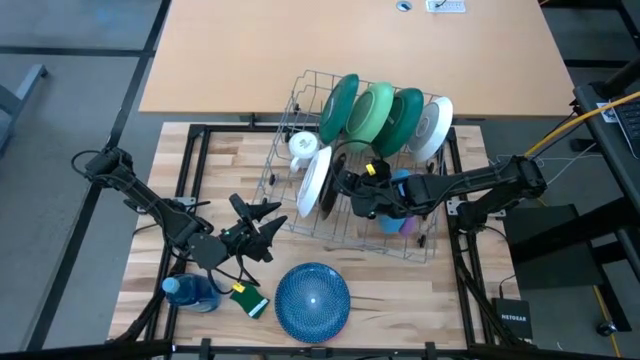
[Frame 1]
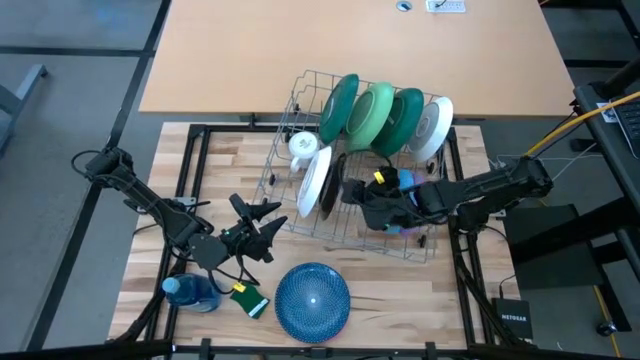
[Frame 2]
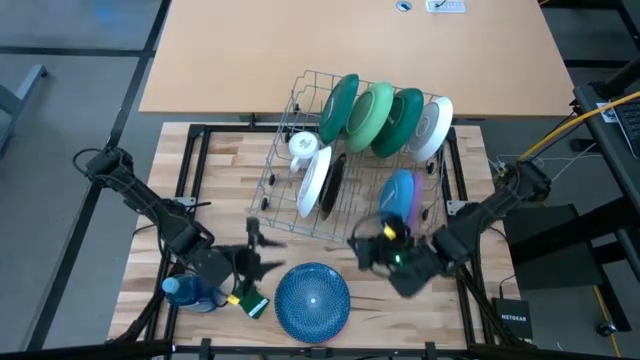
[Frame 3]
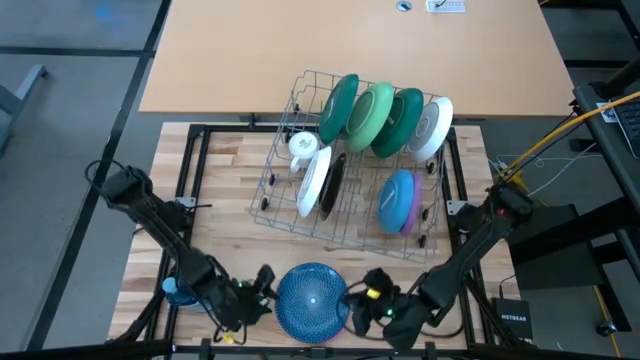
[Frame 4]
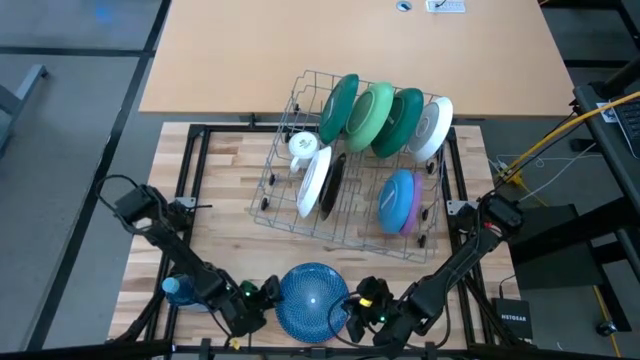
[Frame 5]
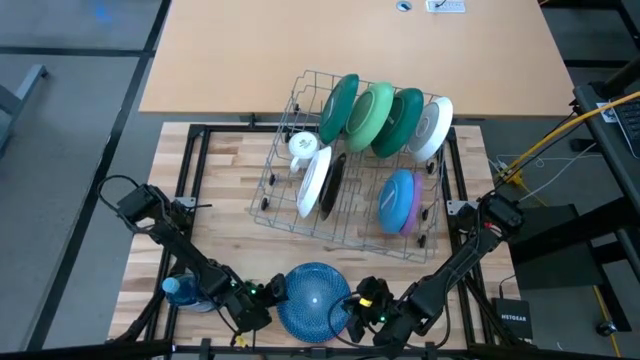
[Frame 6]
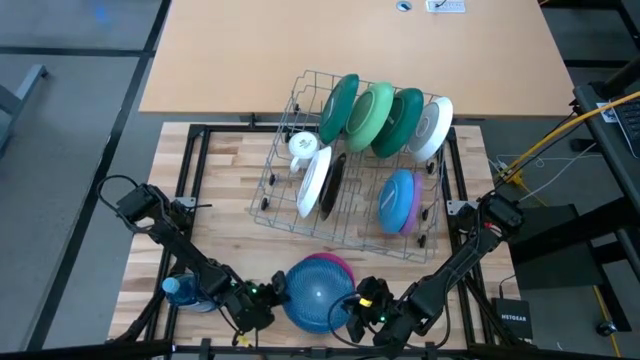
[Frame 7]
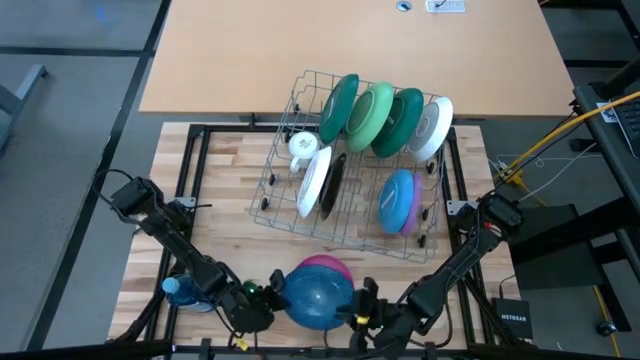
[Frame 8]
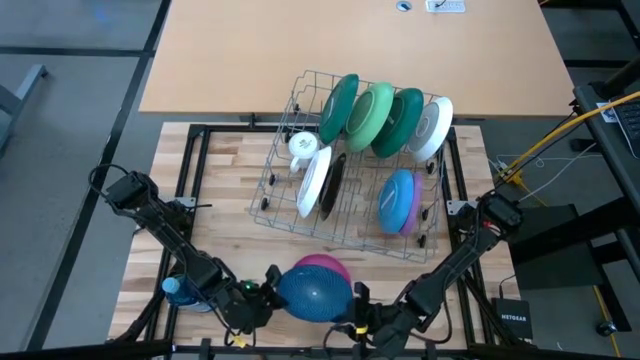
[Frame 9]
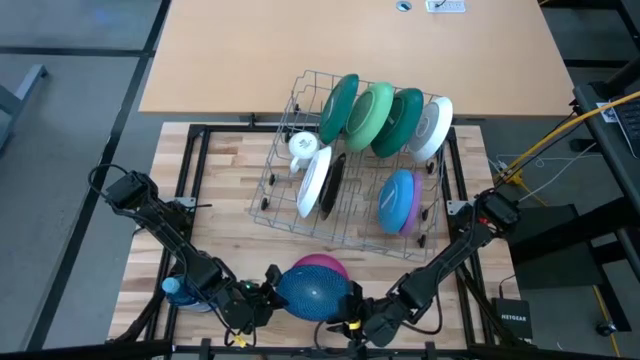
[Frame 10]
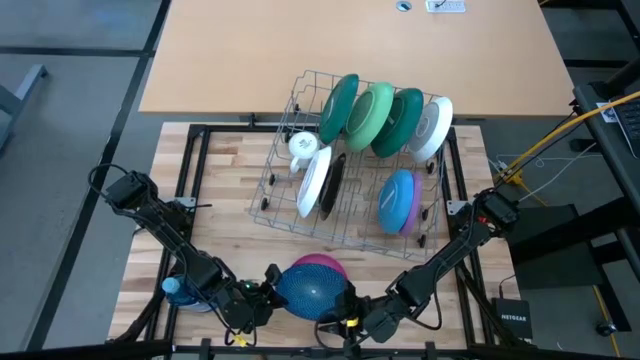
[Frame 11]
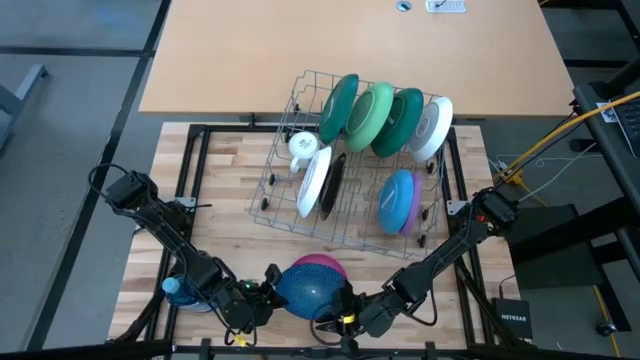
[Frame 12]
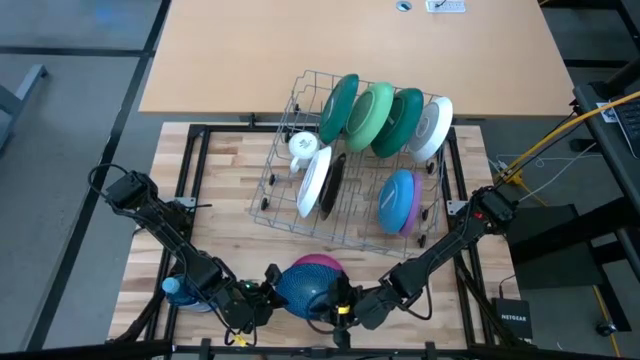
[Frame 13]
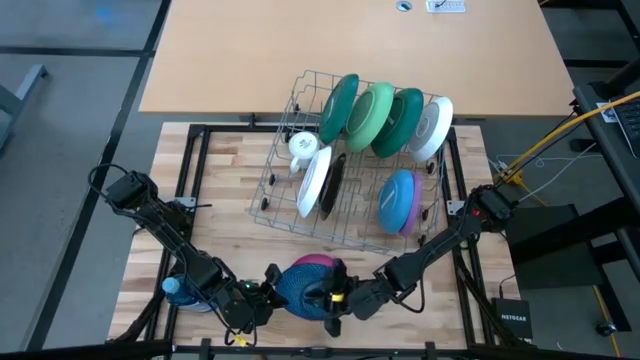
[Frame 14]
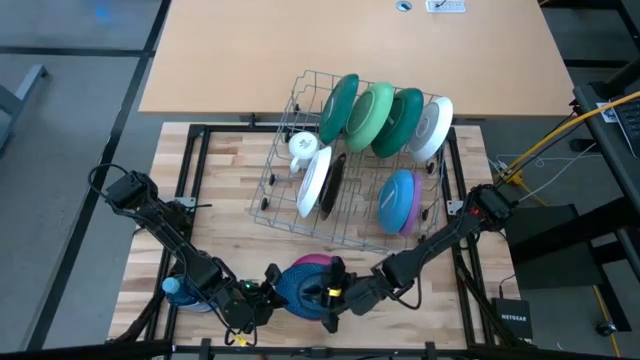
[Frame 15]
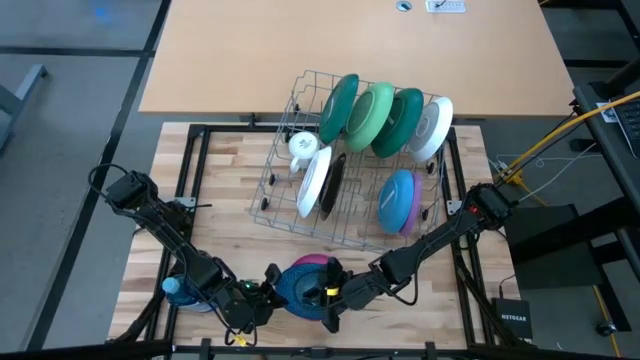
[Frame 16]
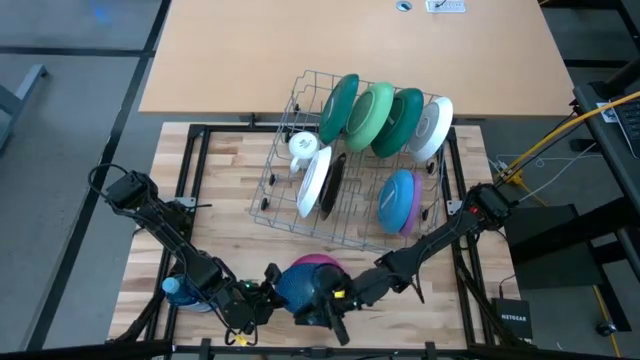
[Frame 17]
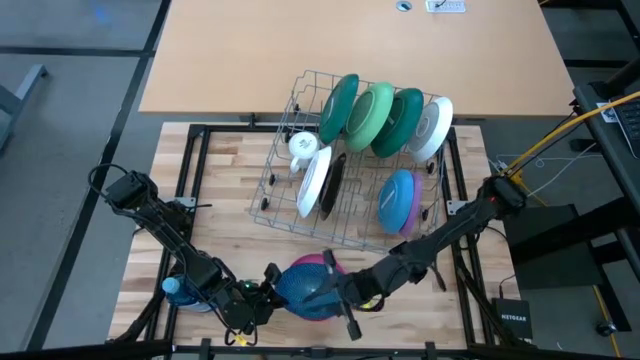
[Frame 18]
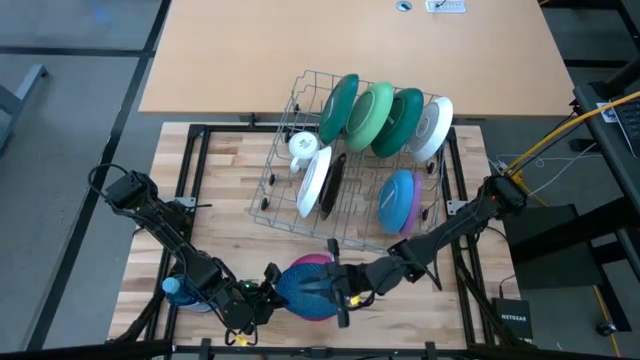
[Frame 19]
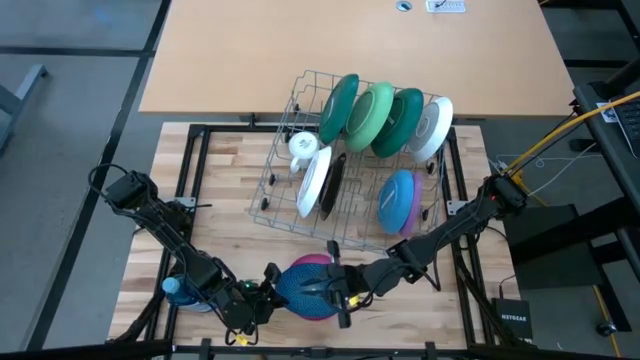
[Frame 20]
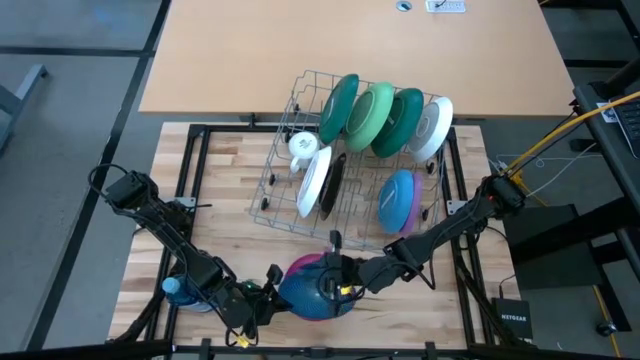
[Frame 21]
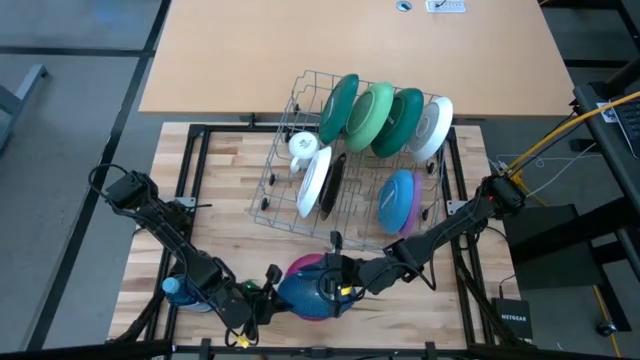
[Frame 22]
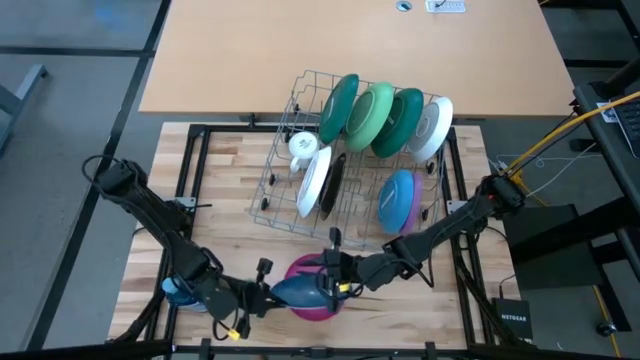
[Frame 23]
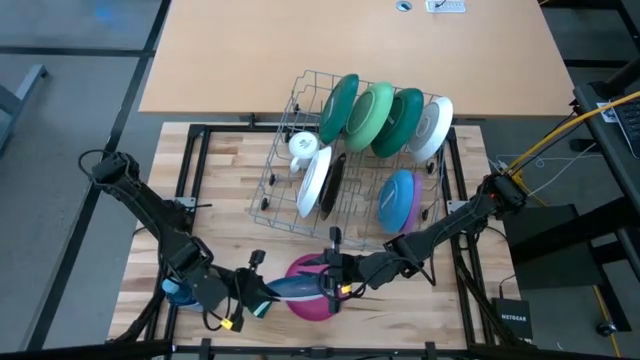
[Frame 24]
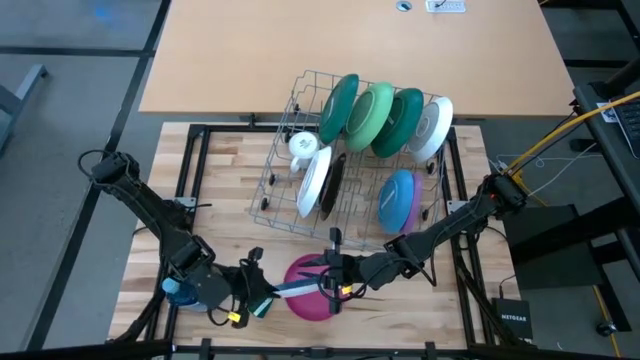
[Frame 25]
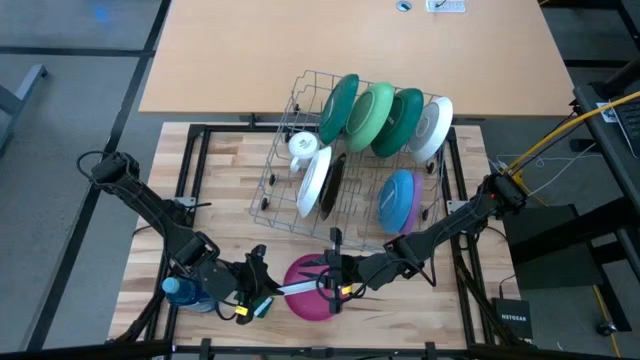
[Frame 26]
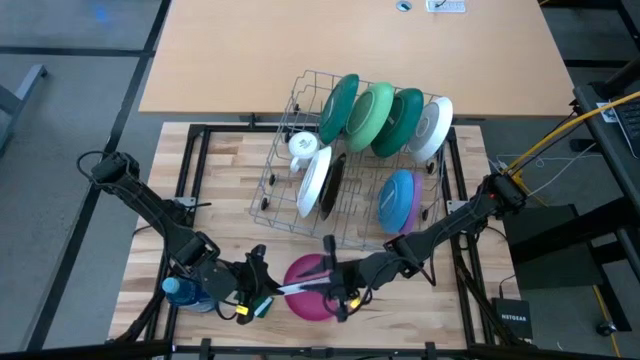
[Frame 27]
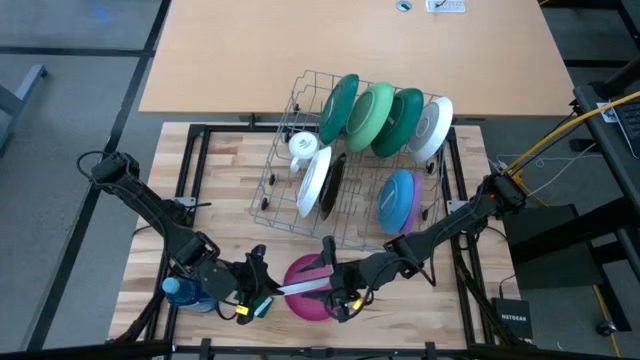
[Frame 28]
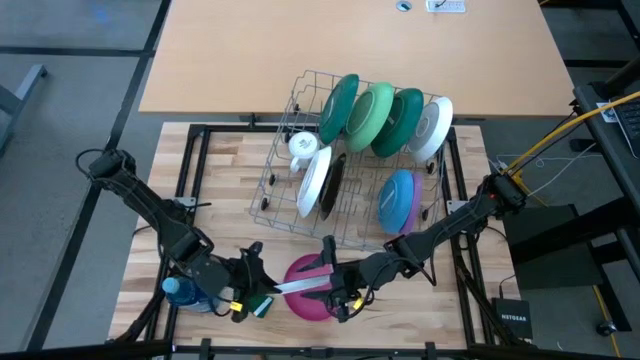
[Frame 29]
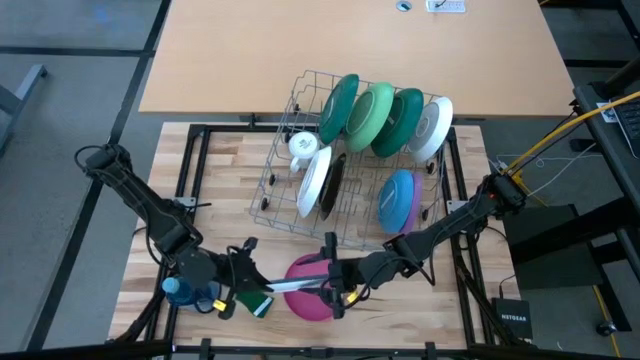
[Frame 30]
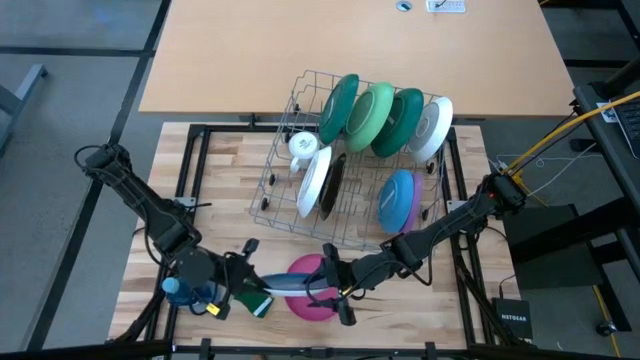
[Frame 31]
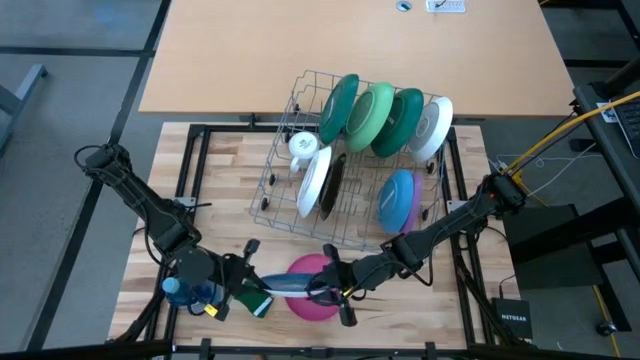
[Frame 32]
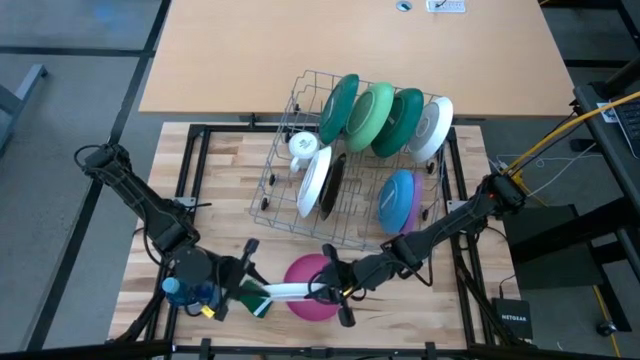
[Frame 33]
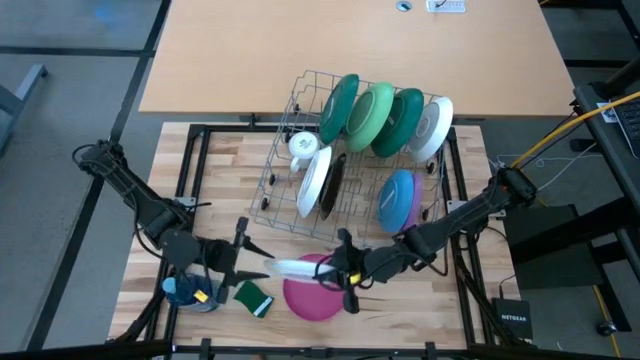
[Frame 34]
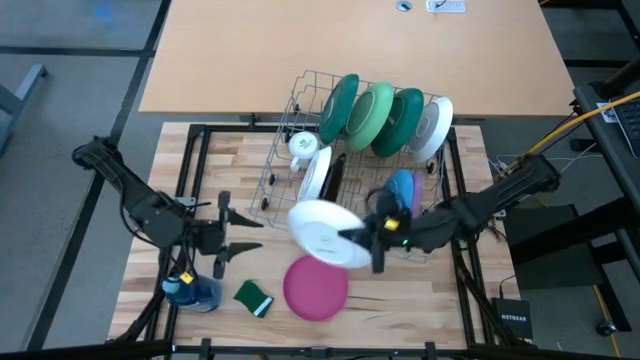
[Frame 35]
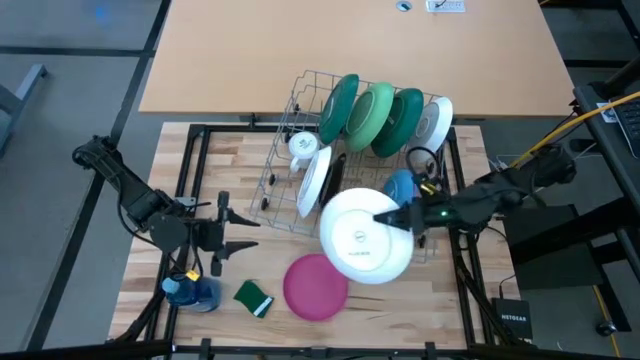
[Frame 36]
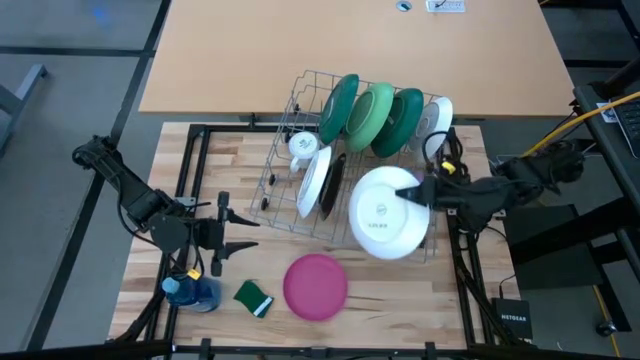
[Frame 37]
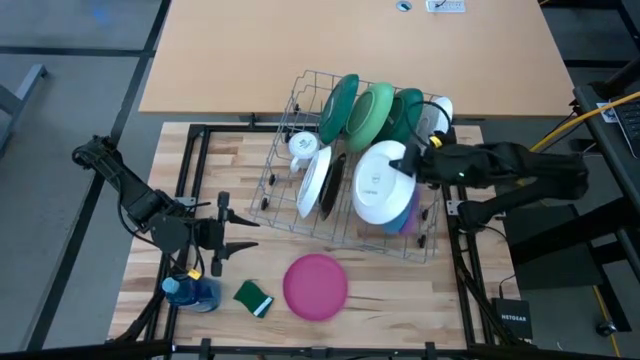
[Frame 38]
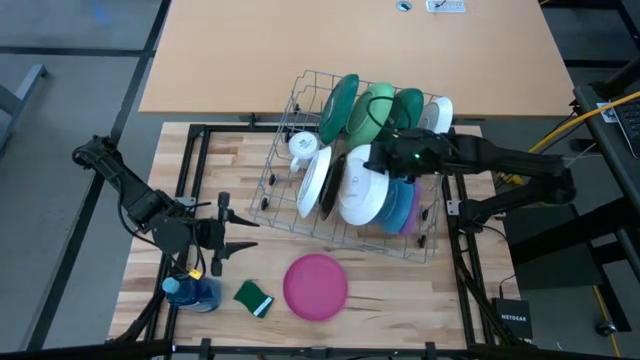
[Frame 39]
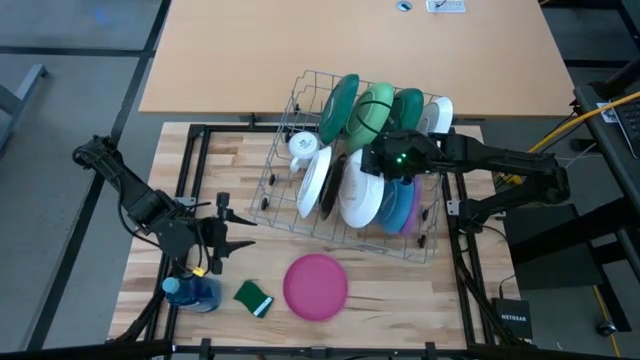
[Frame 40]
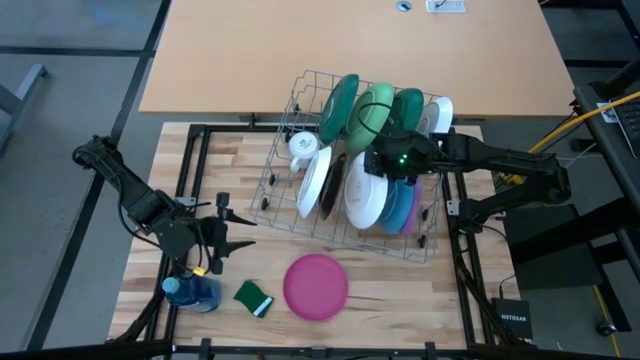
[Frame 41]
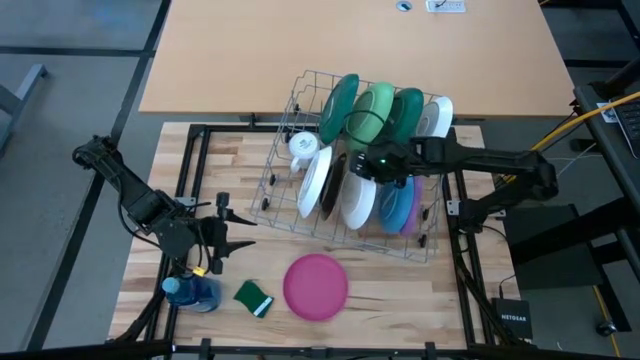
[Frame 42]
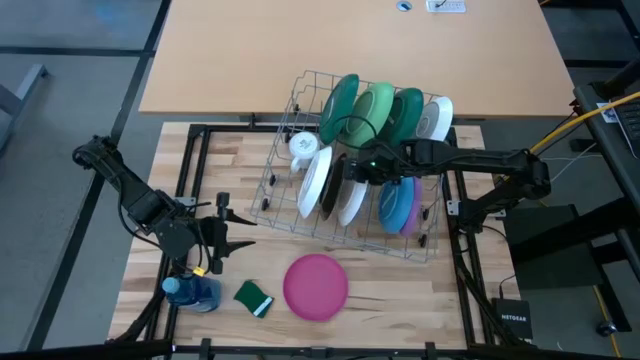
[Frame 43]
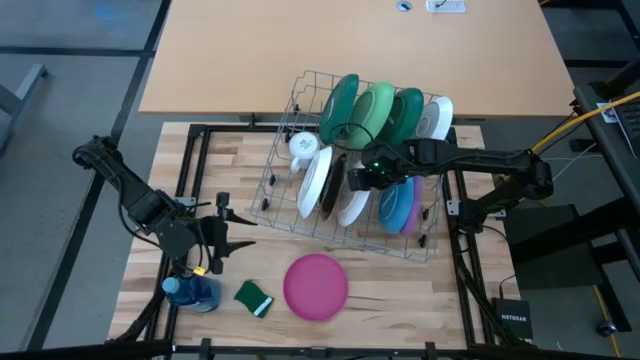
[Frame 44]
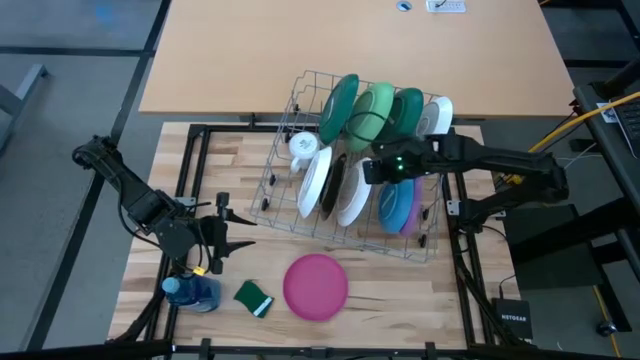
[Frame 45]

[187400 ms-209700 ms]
Task: Sort dishes
Put the blue pattern plate in the dish rack
